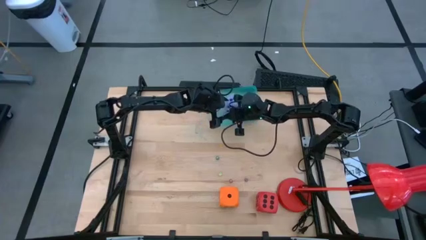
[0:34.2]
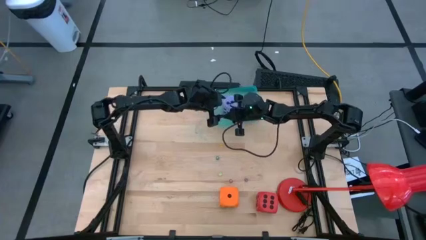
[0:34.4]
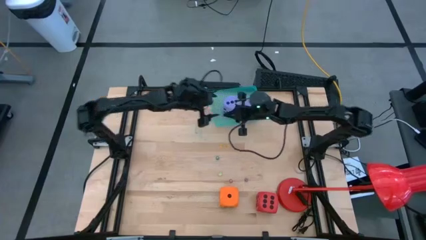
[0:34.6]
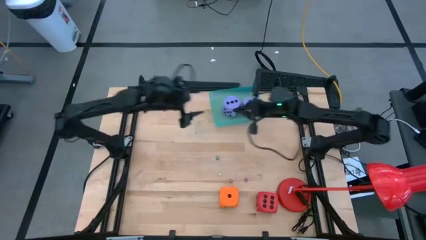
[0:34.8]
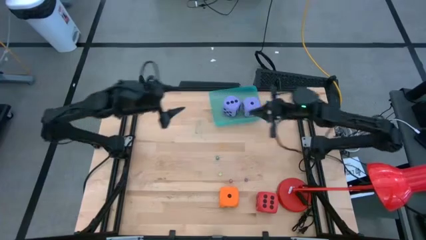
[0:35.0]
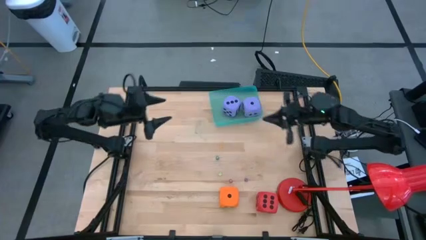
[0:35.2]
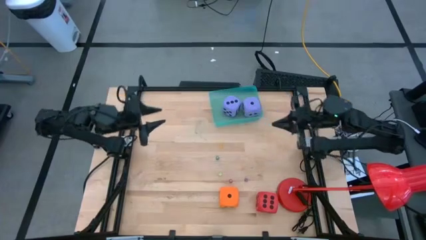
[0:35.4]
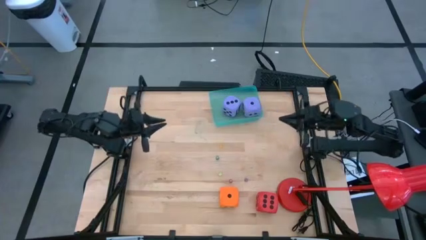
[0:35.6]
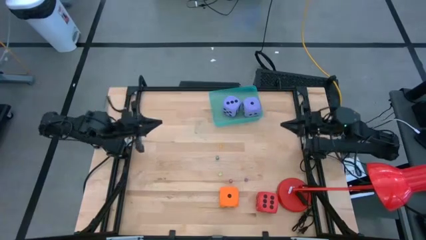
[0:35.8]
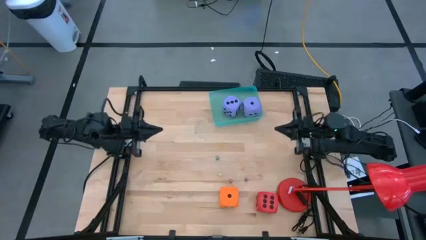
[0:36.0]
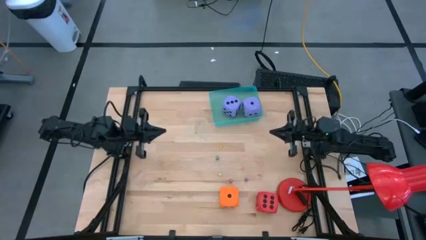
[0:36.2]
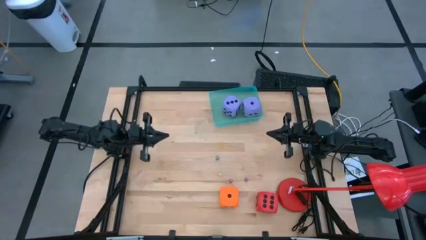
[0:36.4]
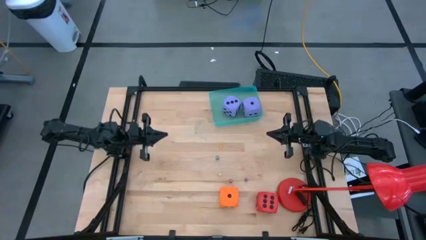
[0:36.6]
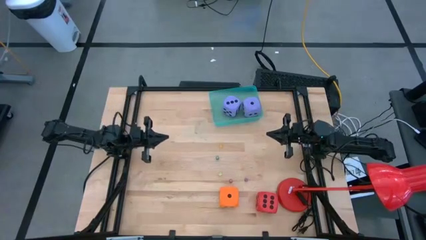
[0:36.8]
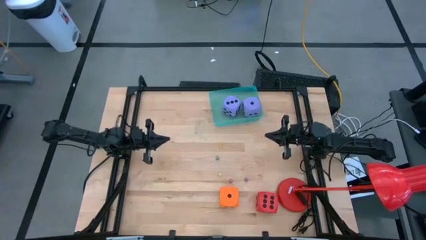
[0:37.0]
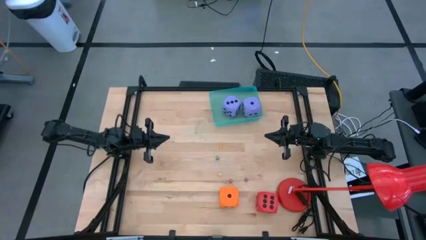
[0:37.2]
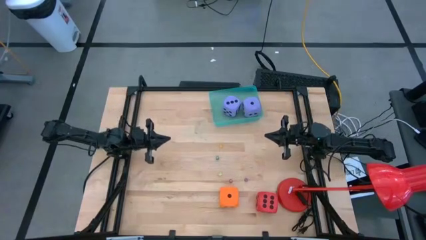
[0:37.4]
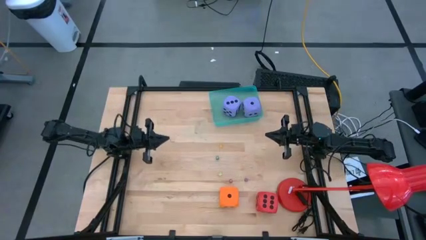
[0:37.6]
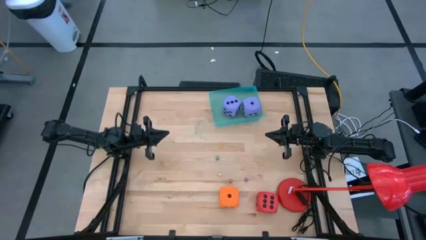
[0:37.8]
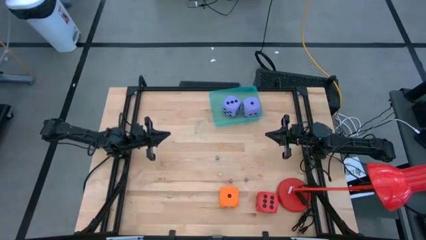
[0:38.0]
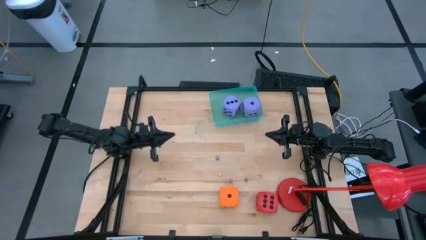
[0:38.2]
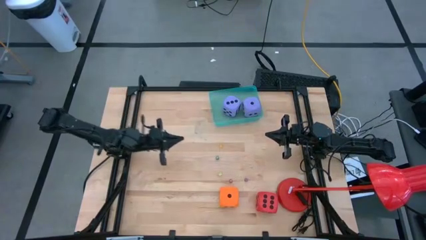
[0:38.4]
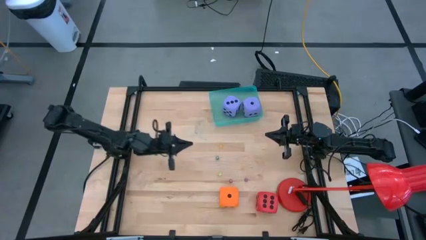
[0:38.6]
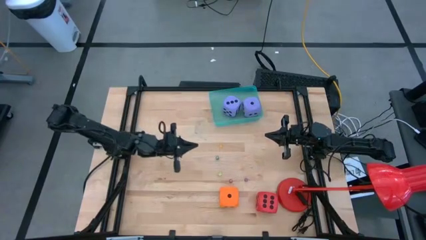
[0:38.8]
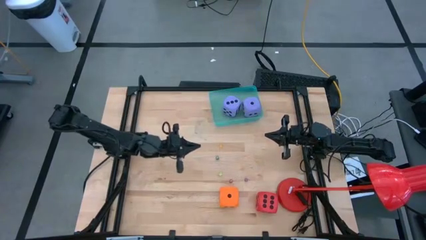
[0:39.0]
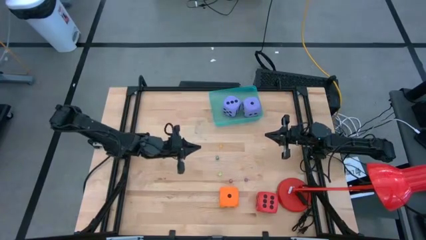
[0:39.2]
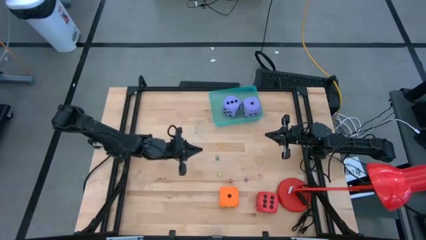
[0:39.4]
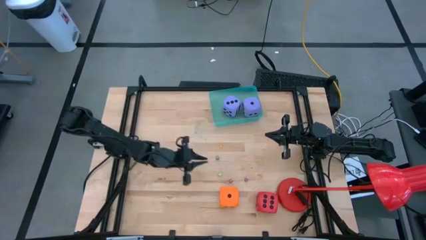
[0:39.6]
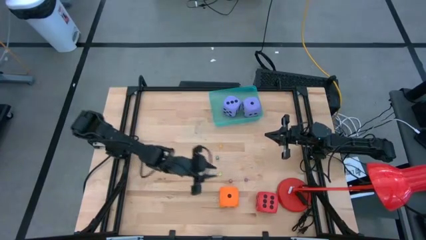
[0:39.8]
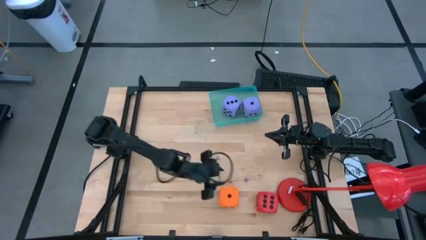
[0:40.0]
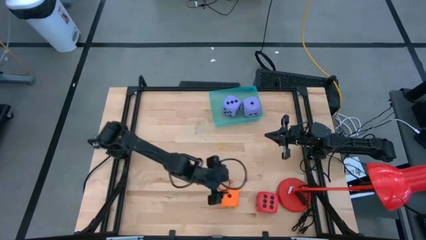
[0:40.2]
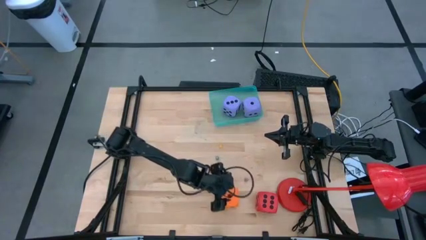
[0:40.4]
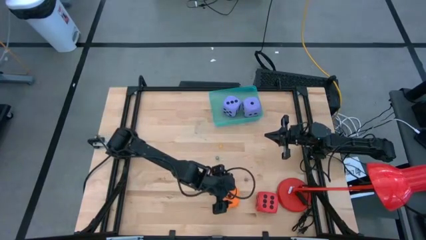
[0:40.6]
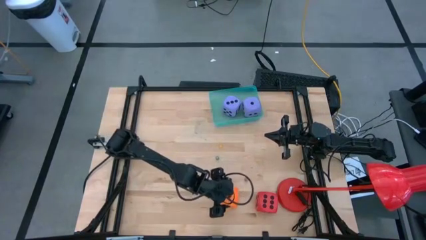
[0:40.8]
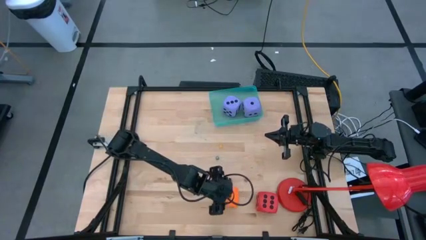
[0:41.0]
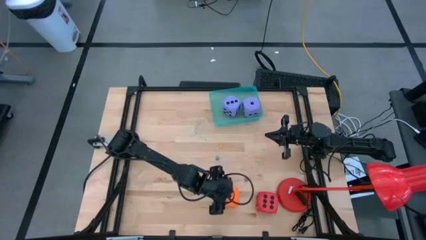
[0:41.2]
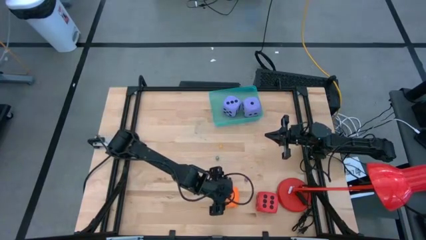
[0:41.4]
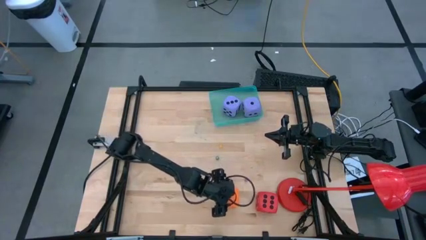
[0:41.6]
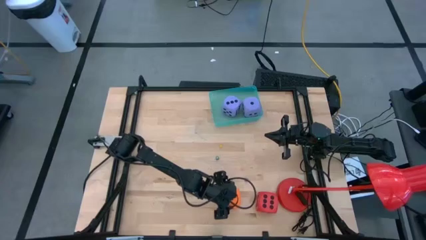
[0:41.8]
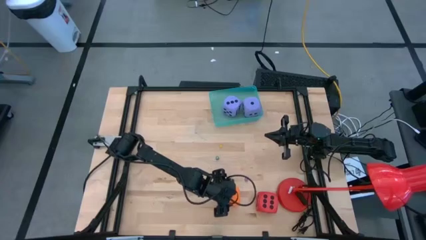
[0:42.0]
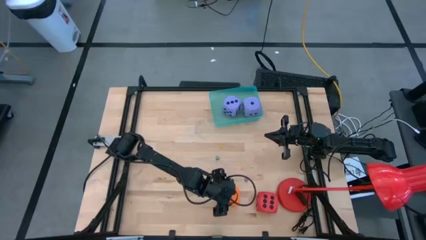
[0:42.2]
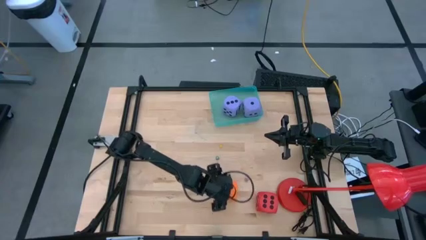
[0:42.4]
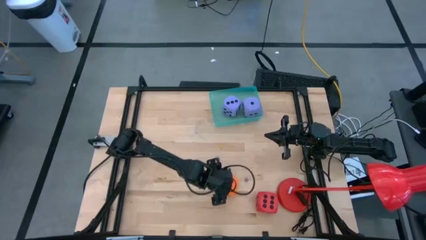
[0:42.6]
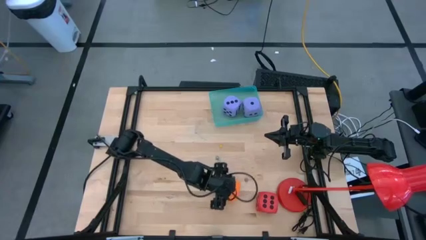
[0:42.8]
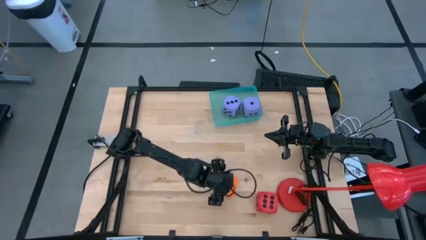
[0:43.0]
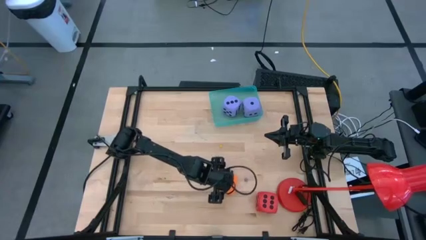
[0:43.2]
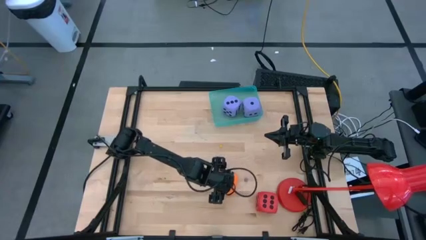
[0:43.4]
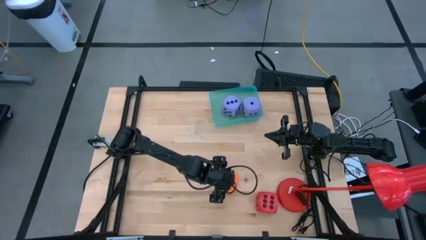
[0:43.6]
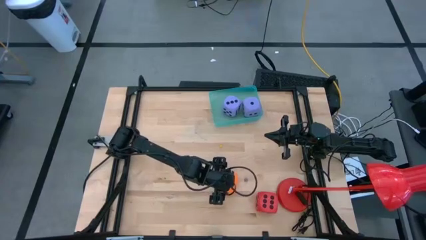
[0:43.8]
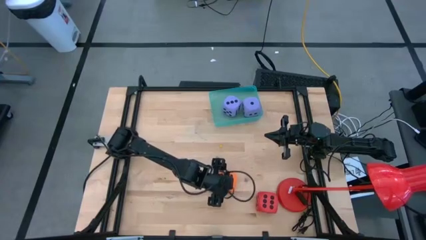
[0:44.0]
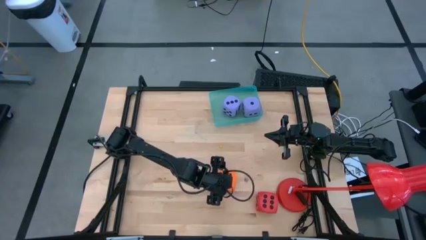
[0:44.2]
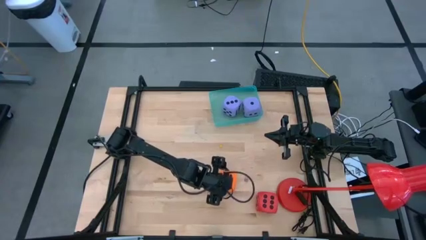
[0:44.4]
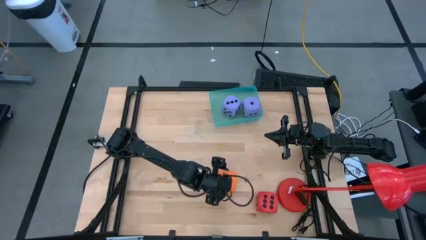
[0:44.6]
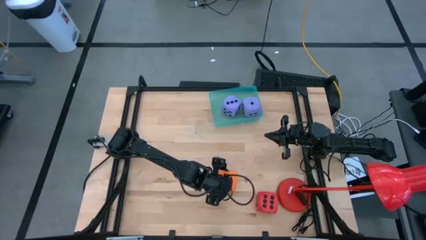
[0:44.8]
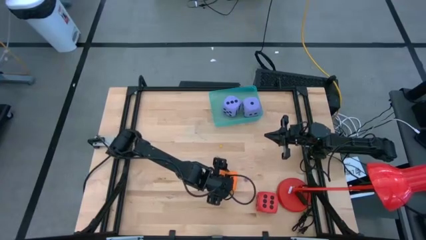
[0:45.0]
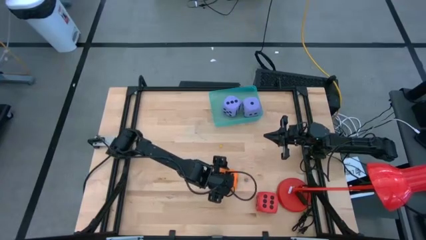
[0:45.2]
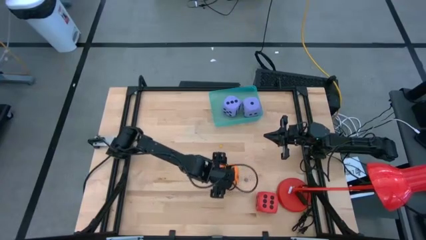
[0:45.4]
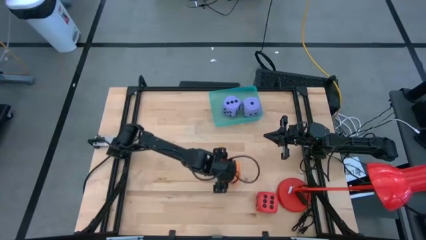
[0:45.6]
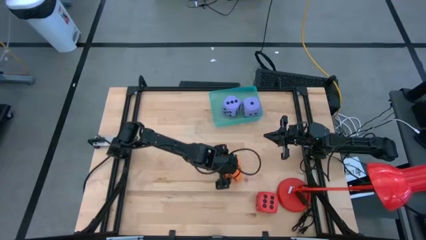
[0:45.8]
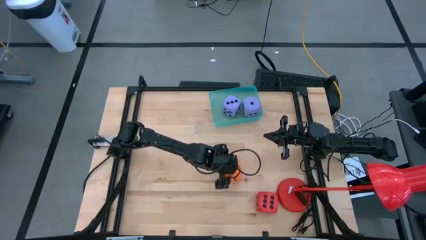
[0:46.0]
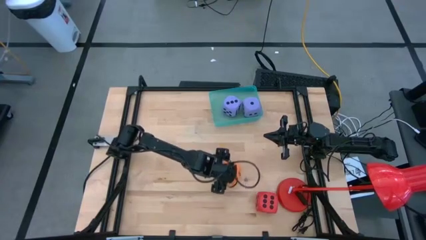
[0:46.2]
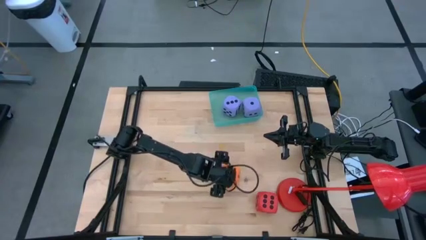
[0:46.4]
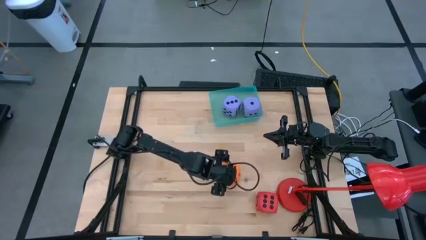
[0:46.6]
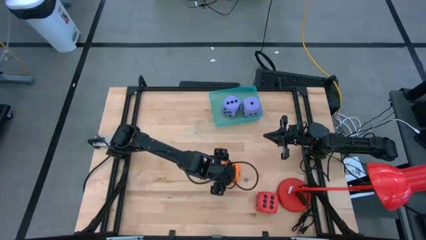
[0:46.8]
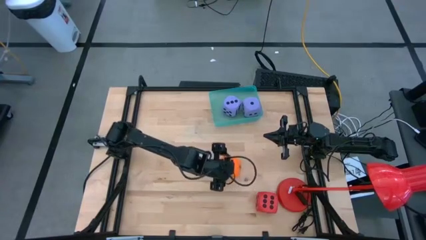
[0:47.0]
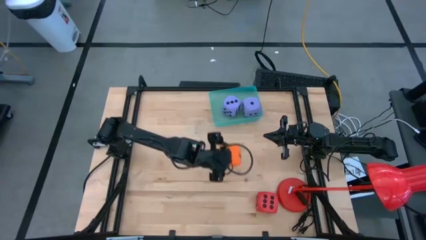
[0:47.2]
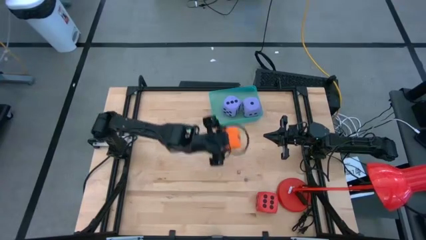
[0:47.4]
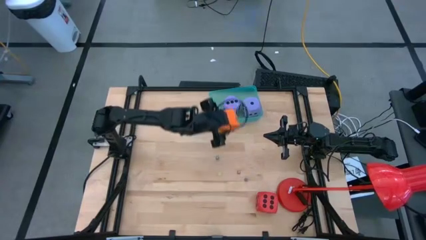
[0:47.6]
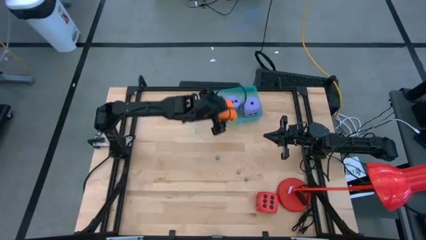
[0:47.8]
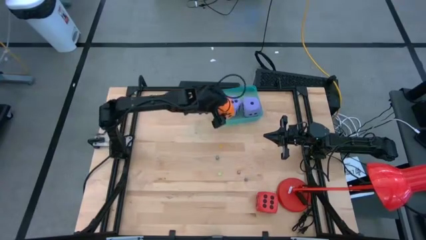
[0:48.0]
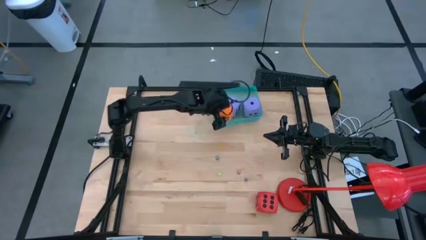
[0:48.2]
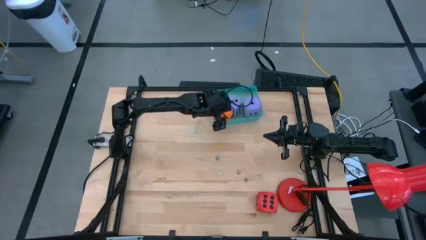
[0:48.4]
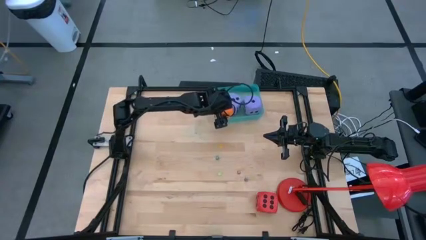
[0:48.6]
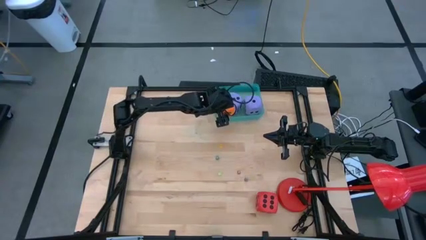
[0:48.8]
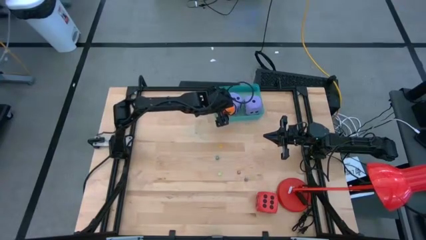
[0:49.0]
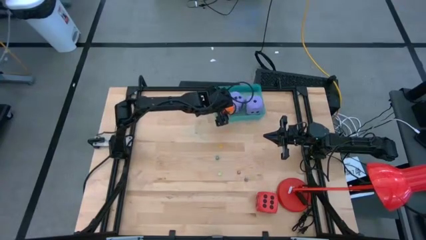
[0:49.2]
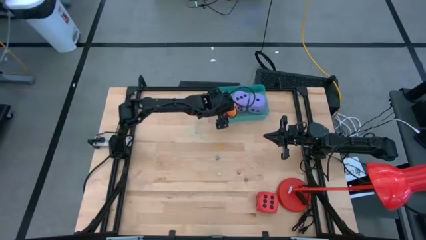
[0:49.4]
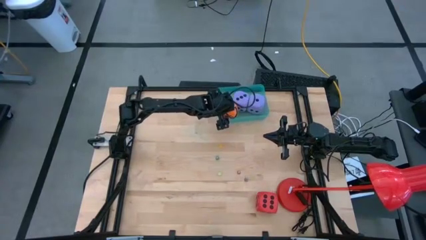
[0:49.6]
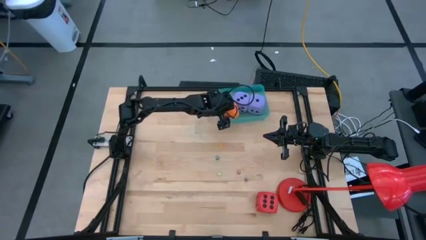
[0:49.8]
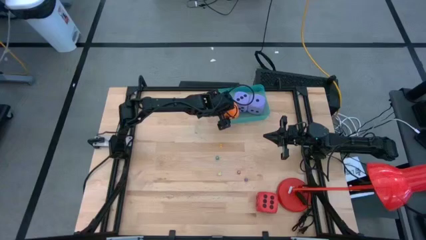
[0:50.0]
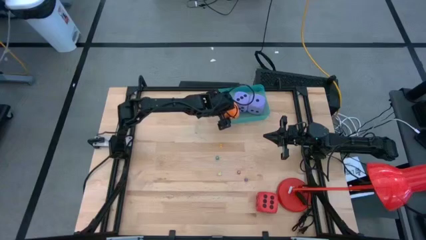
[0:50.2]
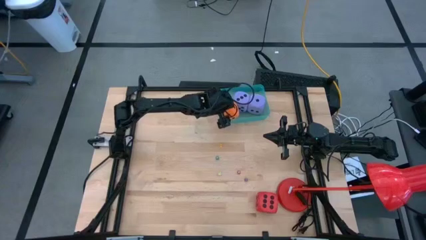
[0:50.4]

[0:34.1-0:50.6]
Task: Pick & Place Dice
Put the large orange dice into the blue transparent bin
